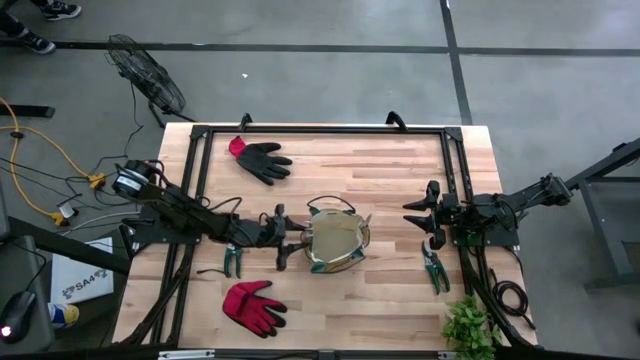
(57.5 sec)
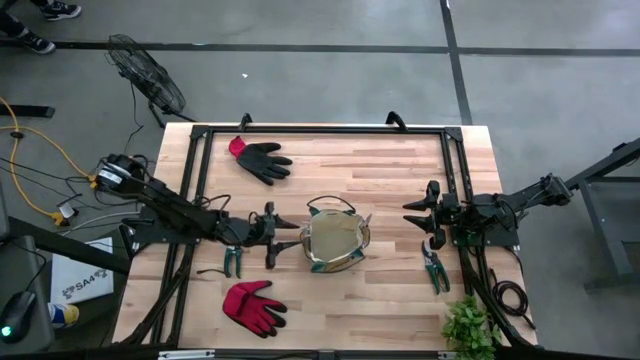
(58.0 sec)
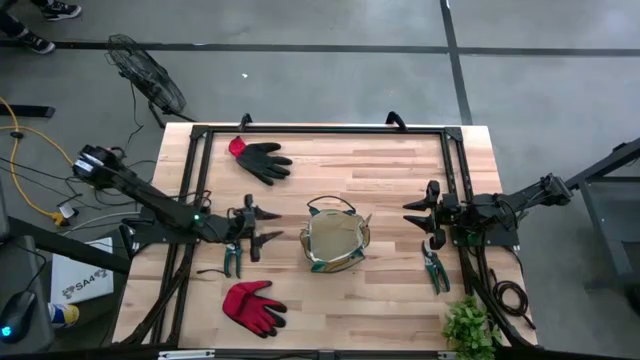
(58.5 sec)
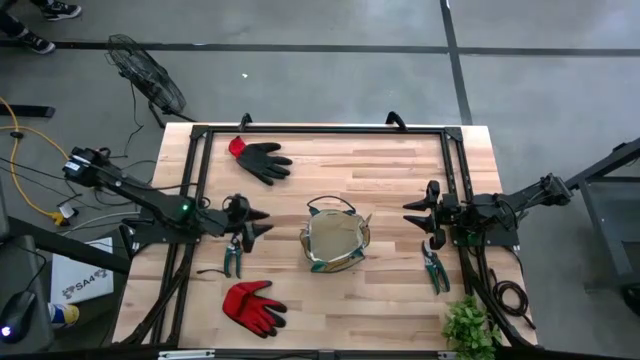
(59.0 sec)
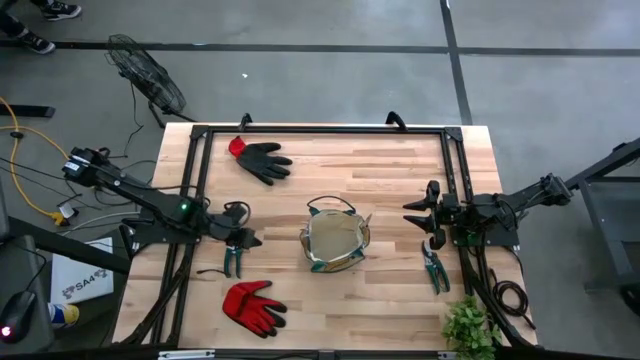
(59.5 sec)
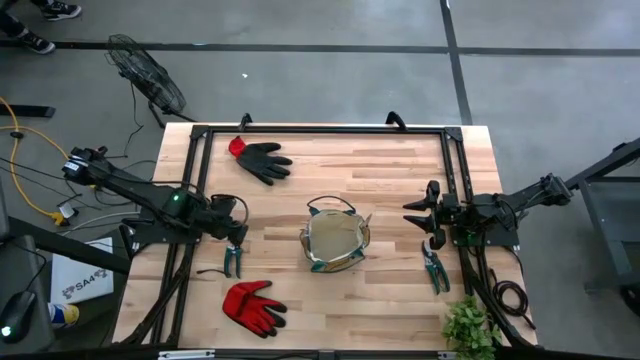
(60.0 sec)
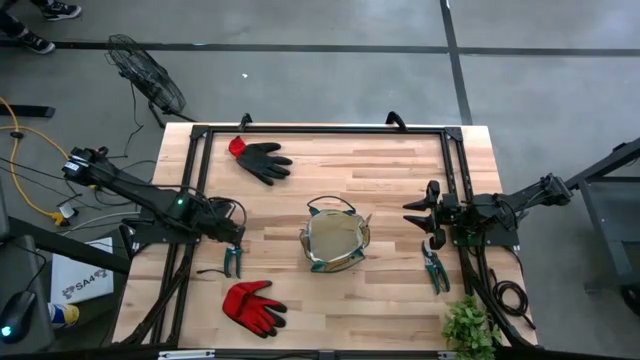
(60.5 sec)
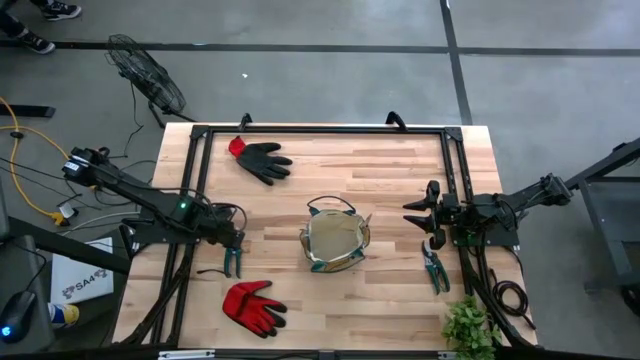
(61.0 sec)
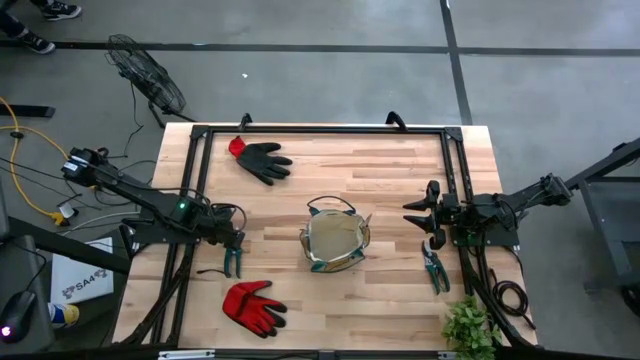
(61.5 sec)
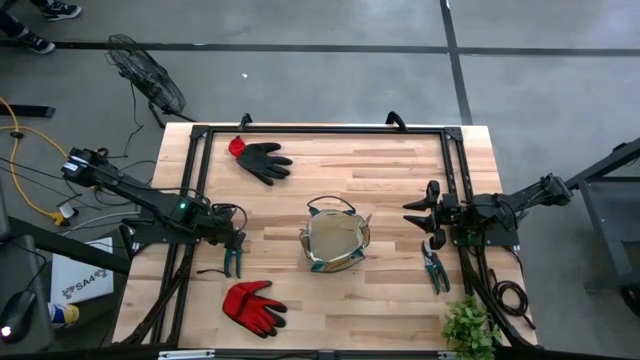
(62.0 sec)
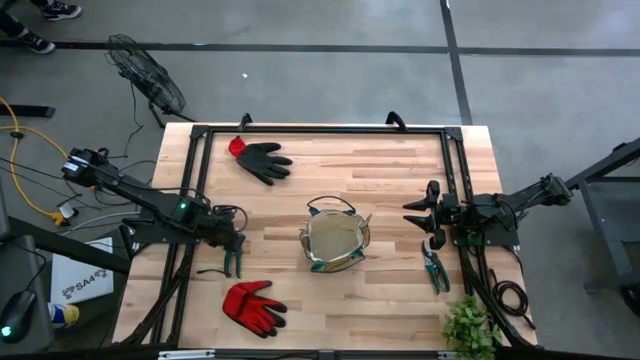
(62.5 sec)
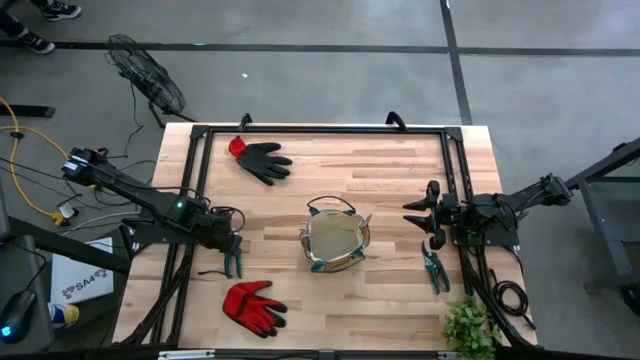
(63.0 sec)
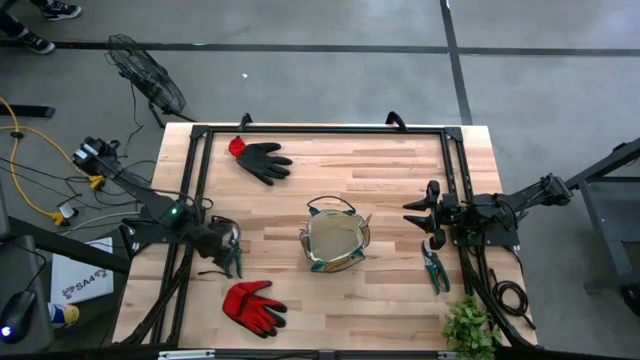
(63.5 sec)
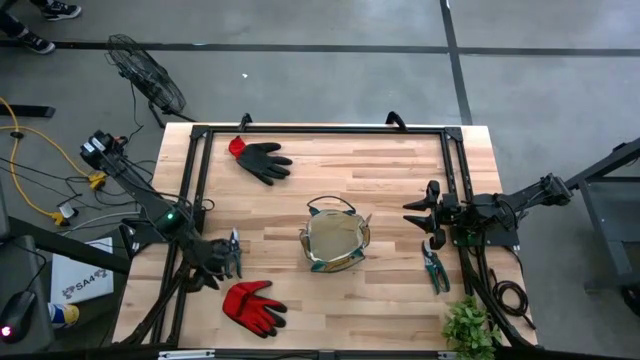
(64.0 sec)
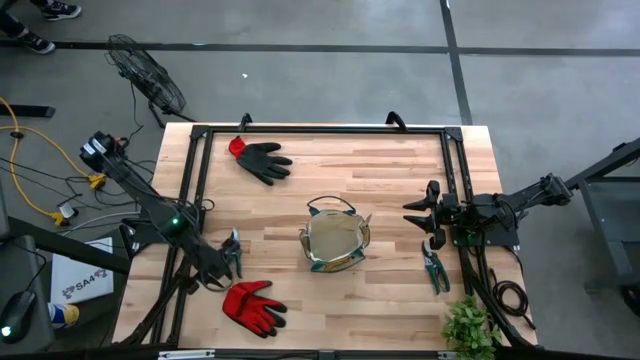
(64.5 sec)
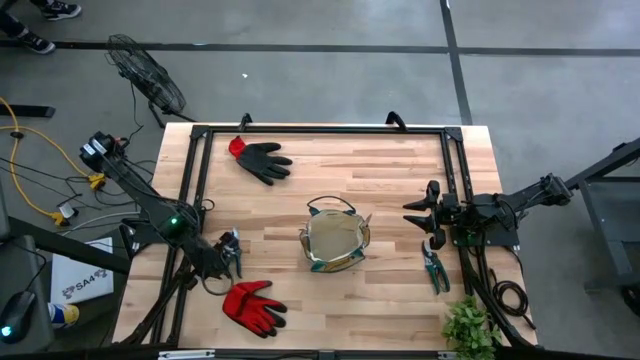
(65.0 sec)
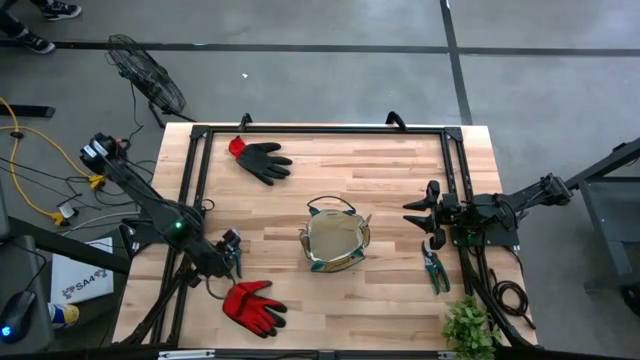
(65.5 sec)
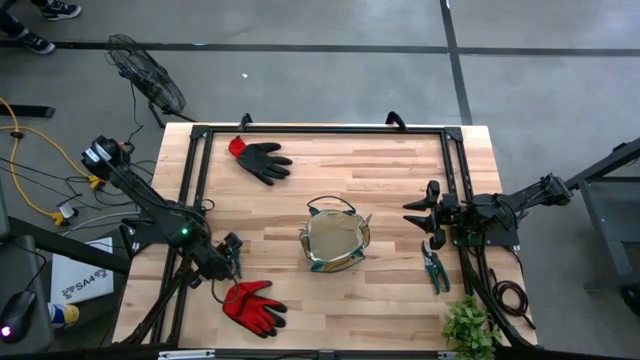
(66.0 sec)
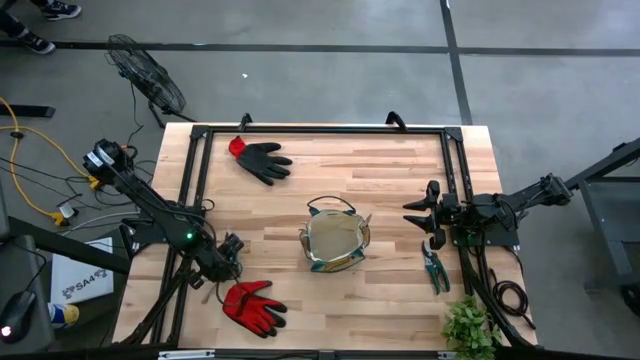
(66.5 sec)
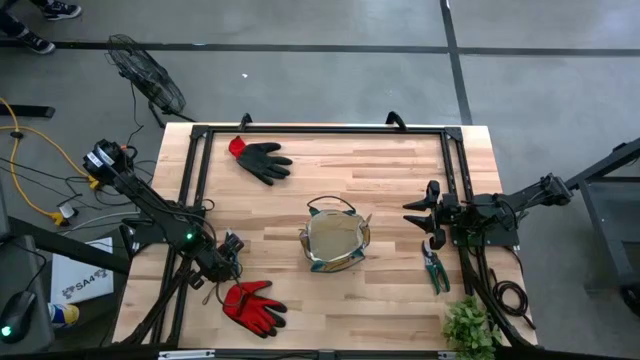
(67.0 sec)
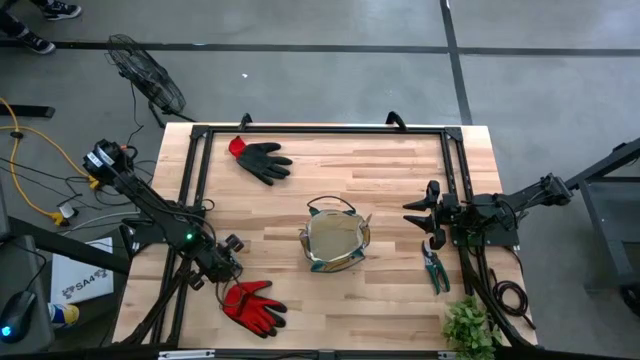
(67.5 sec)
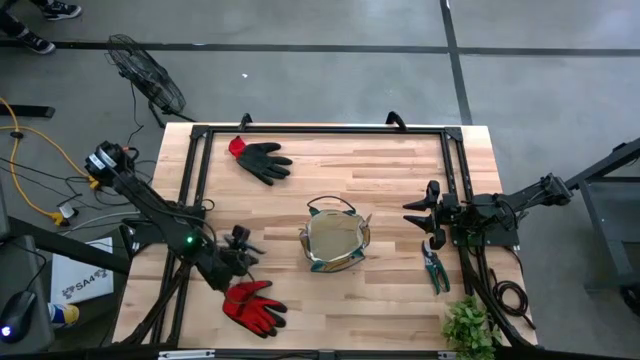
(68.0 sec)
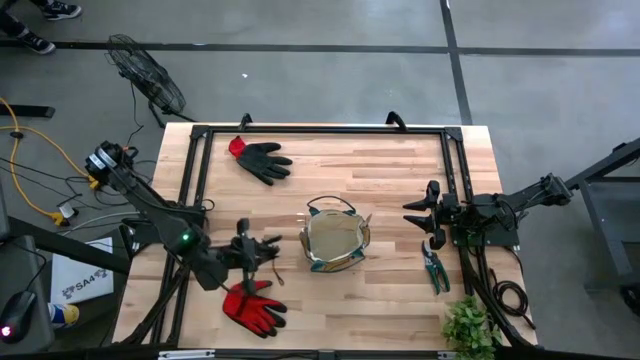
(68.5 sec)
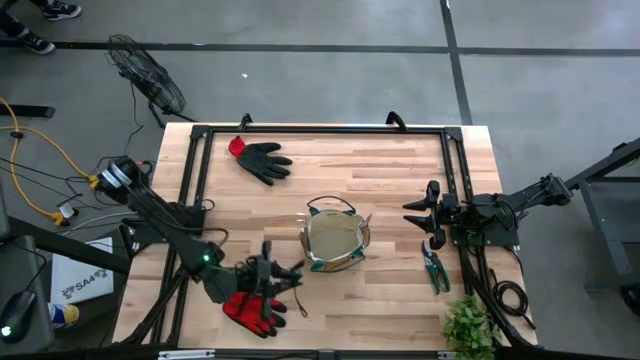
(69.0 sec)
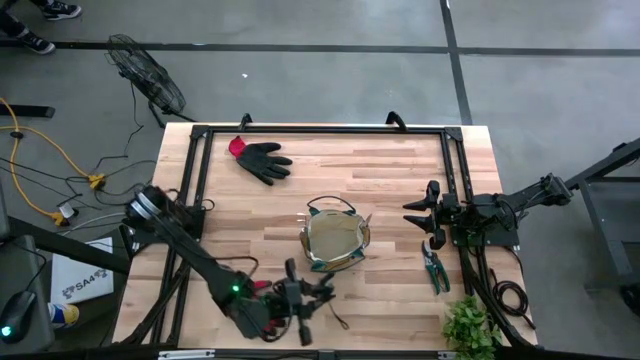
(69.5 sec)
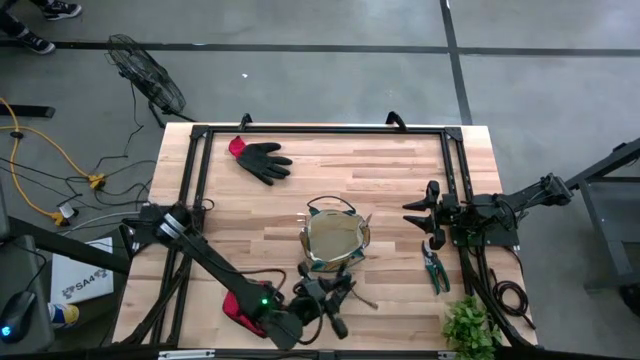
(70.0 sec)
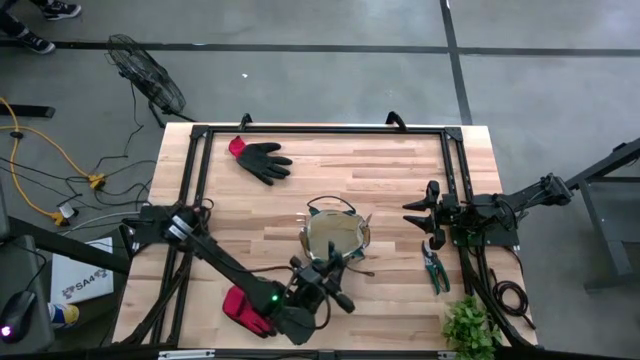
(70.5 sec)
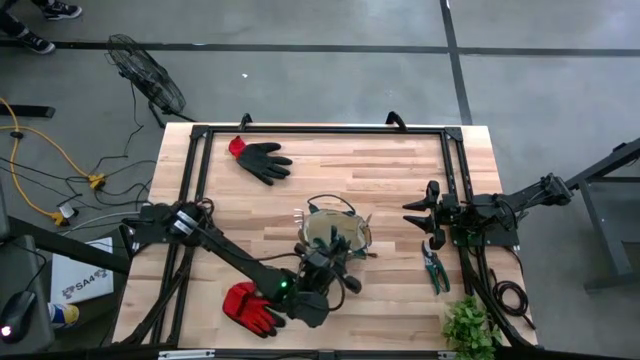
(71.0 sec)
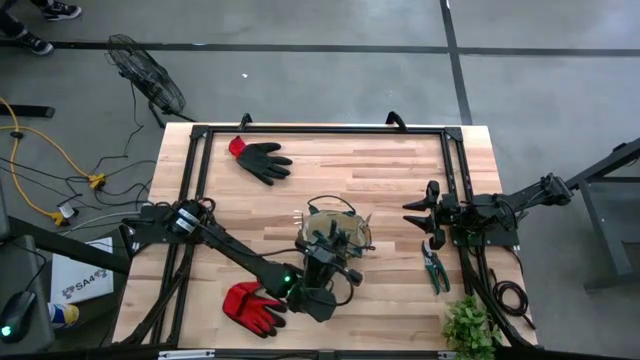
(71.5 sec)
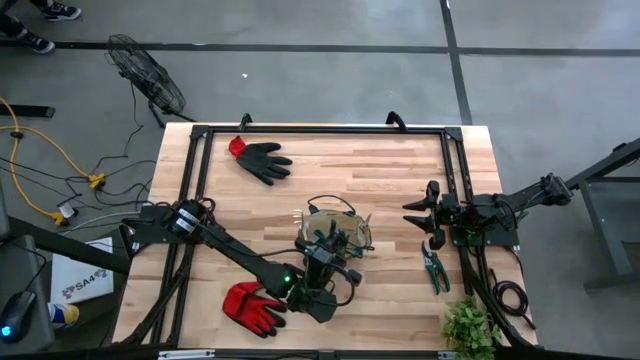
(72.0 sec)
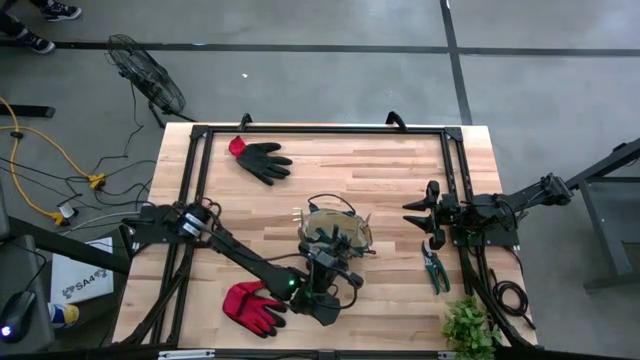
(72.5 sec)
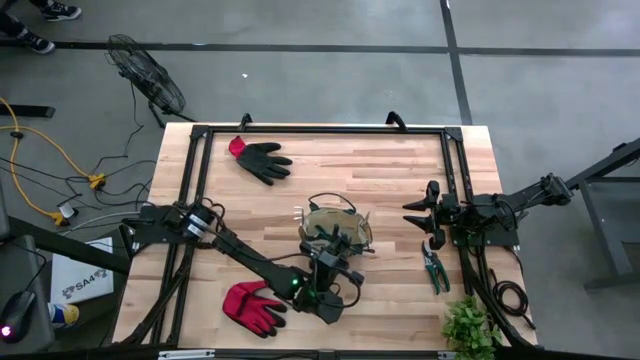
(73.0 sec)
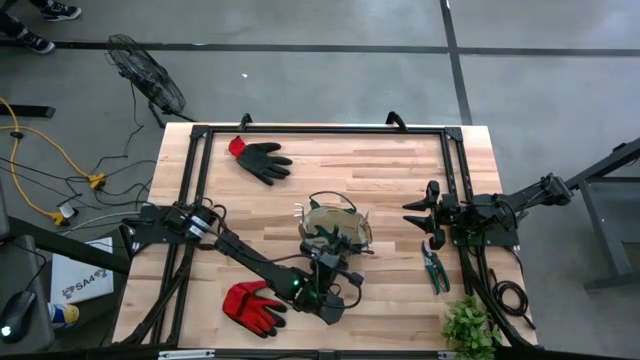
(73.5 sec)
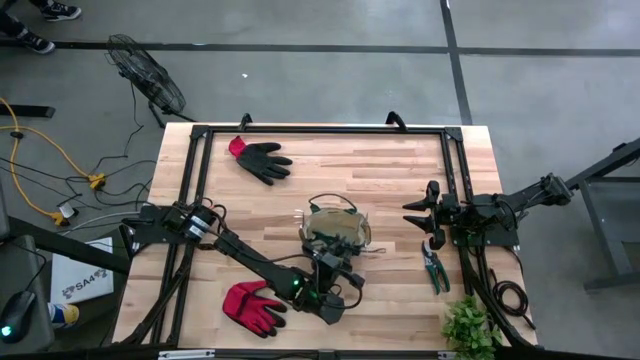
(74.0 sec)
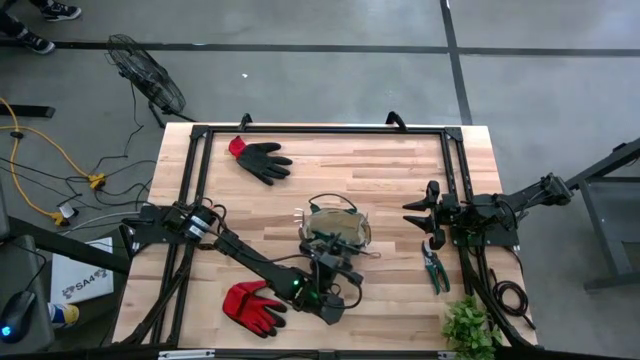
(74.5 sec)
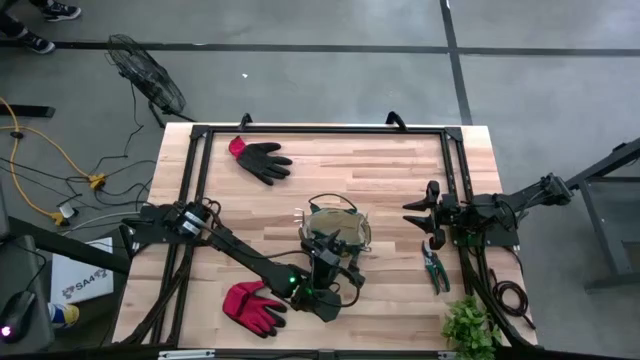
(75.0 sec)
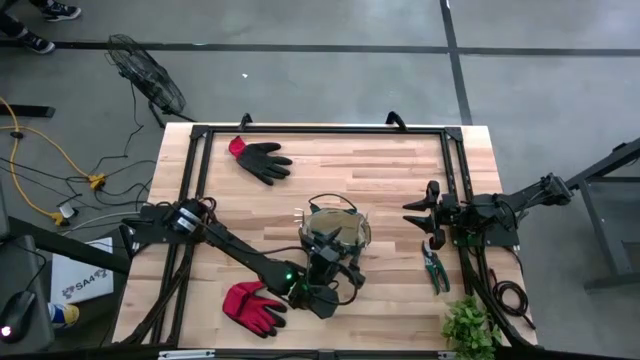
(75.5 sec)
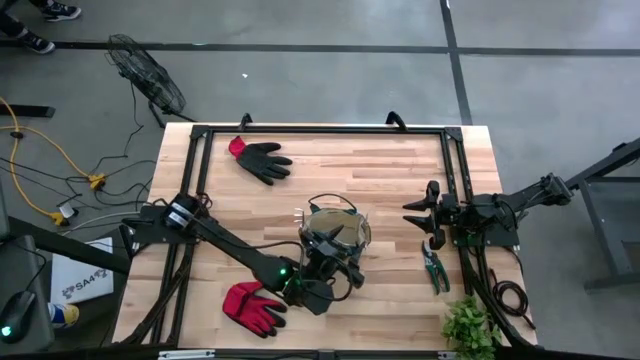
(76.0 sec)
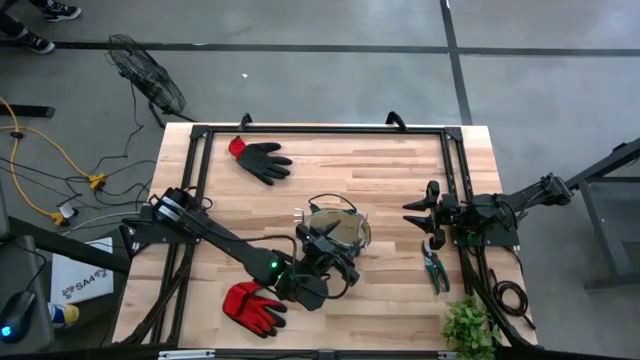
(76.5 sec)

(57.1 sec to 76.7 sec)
Task: Pick & Place Garden tools in Gardening bag
Put the green shear scissors into the gardening bag

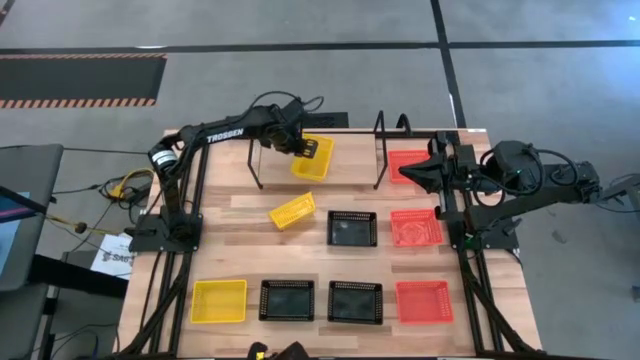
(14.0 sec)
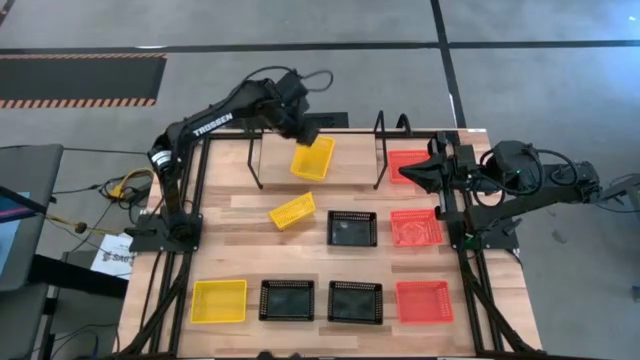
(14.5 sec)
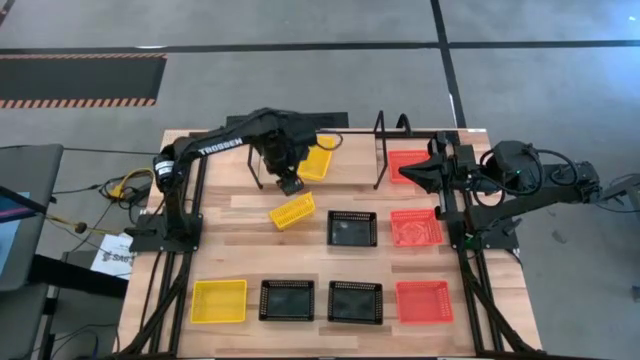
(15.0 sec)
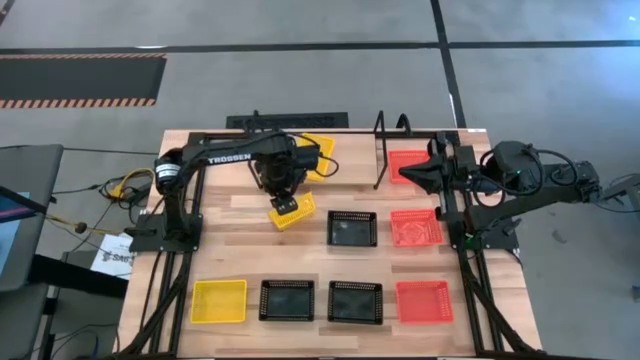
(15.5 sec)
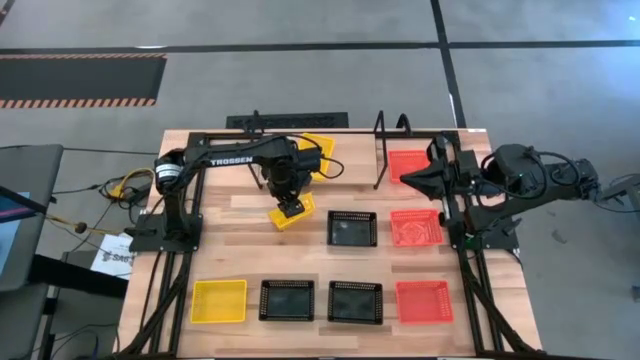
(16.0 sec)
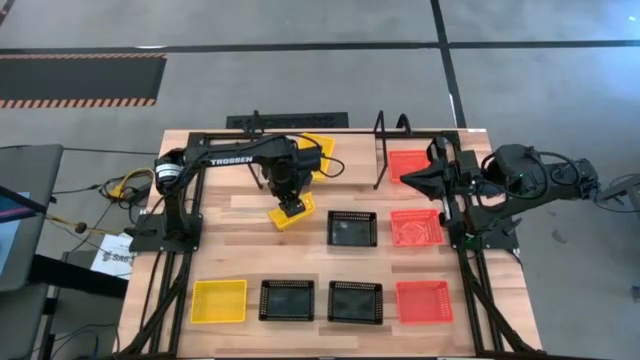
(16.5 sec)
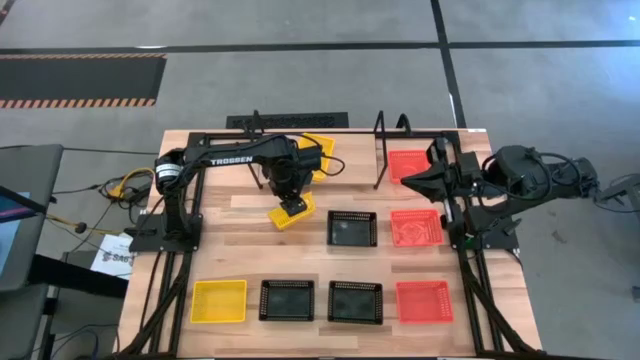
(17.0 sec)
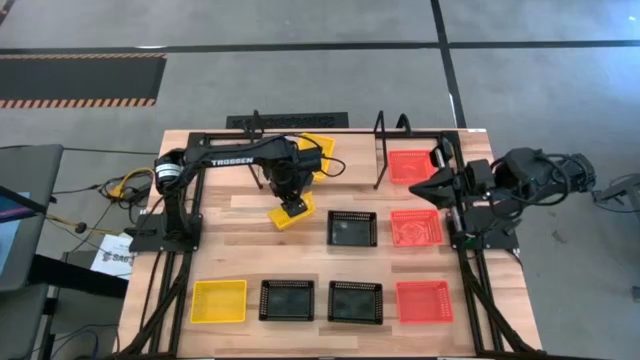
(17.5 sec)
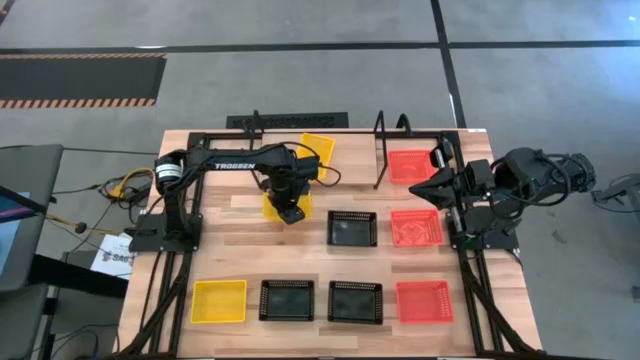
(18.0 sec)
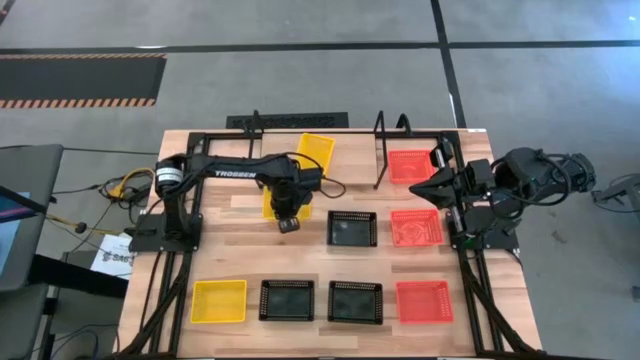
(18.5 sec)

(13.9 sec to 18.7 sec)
Task: Stack baskets on shelf by color
Stack the top yellow bin on top of the other yellow bin on the shelf
